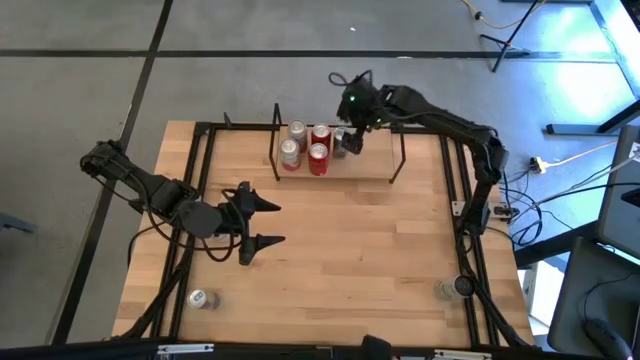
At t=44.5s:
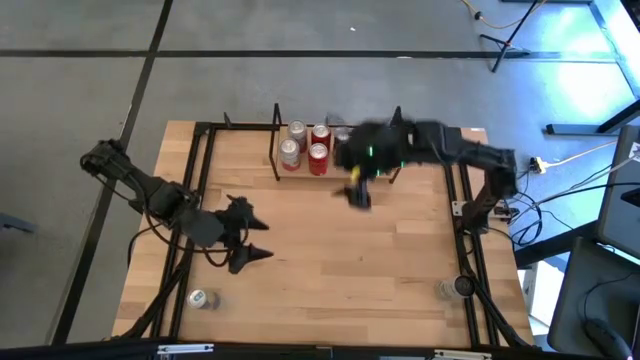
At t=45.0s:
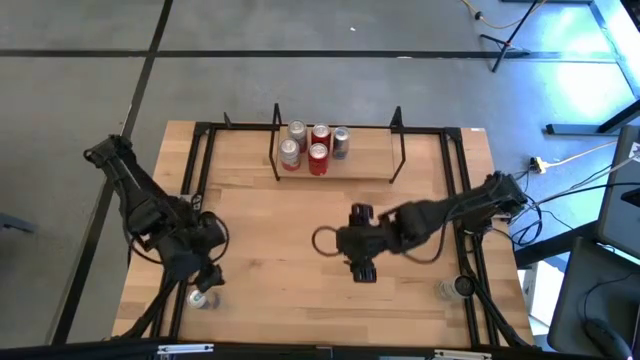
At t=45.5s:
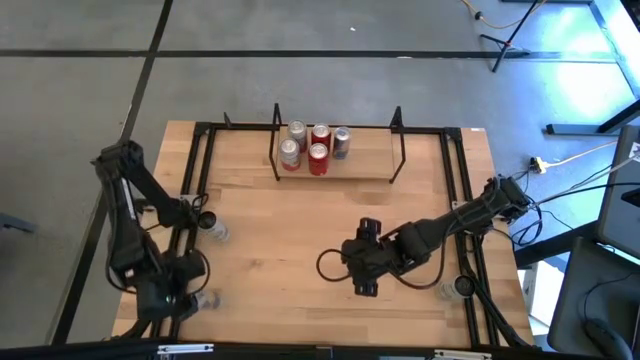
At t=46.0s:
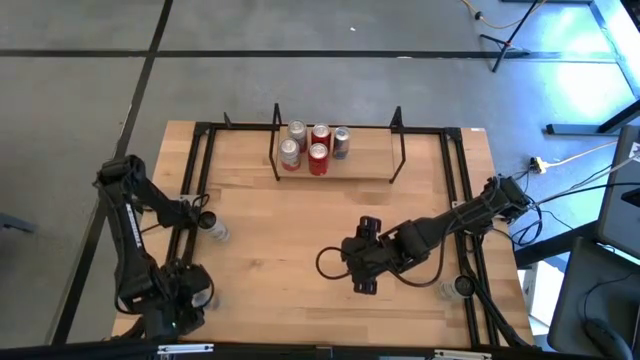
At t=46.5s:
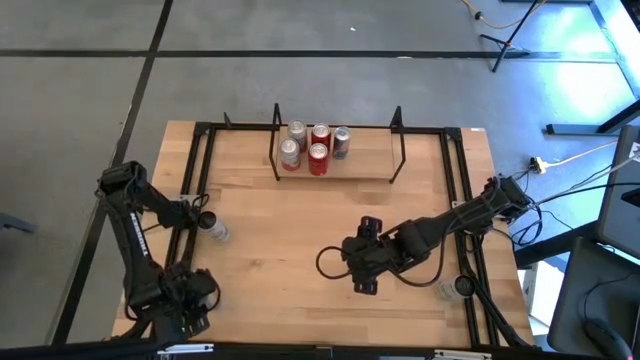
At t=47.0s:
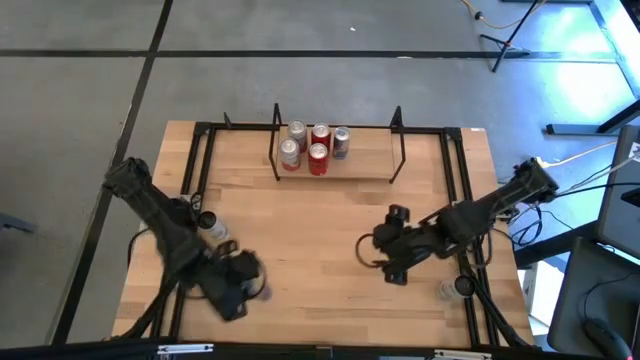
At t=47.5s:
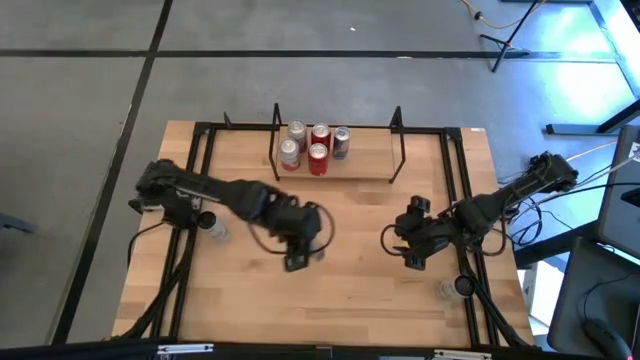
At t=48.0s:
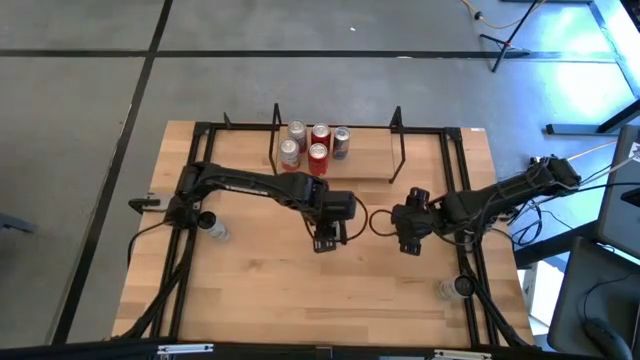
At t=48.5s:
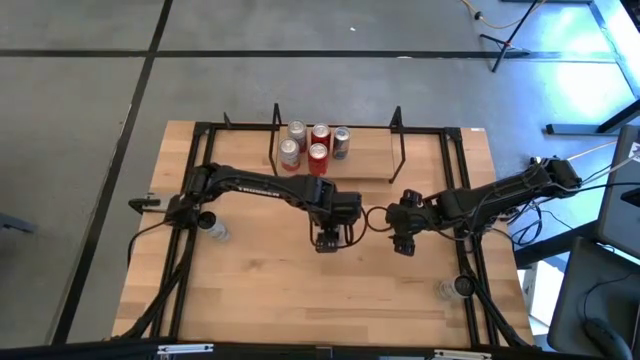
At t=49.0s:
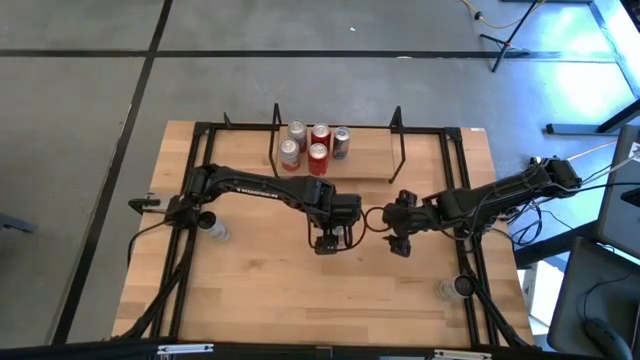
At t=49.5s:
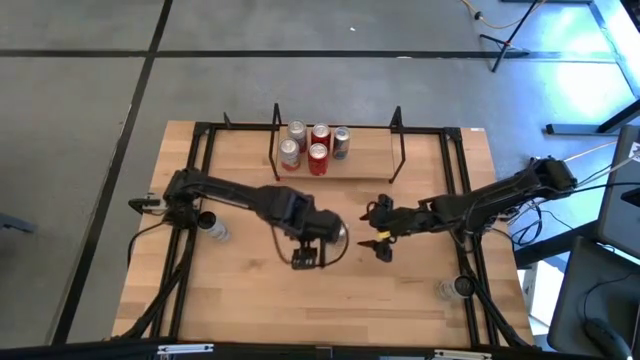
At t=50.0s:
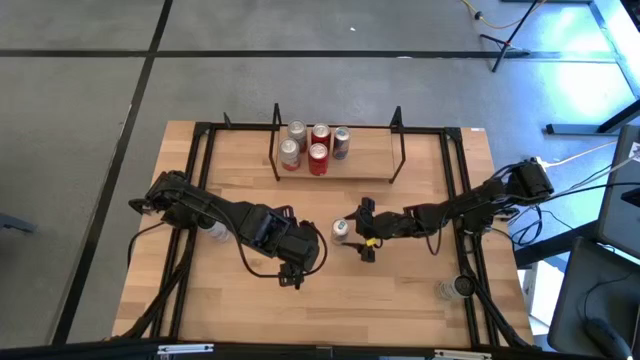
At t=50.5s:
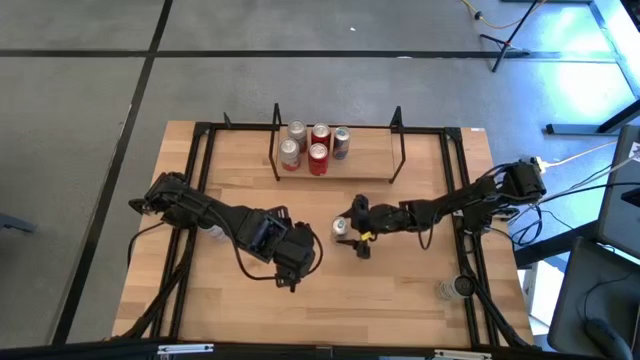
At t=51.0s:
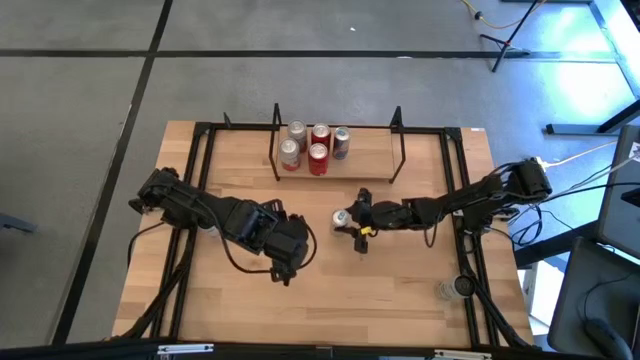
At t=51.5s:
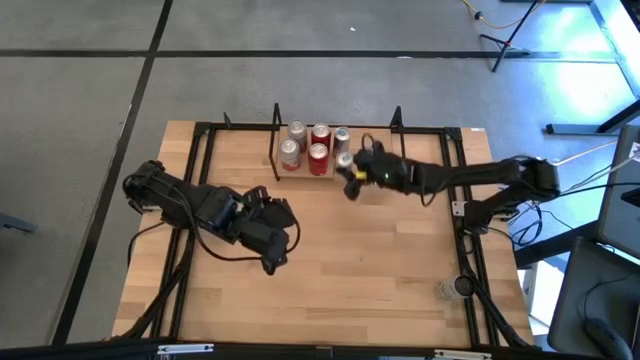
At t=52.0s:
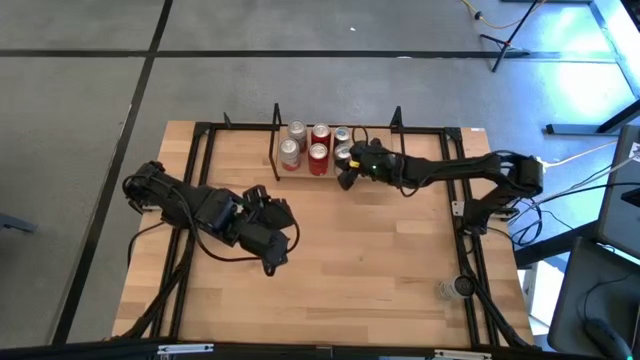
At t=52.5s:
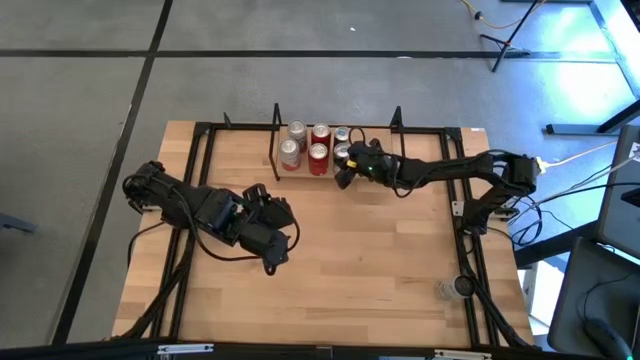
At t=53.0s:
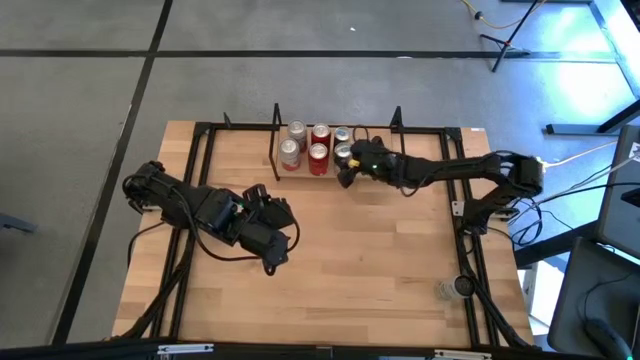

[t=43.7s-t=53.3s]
Task: Place canned beverage on shelf
Put the blue soda can on the shelf aligned with the other blue soda can

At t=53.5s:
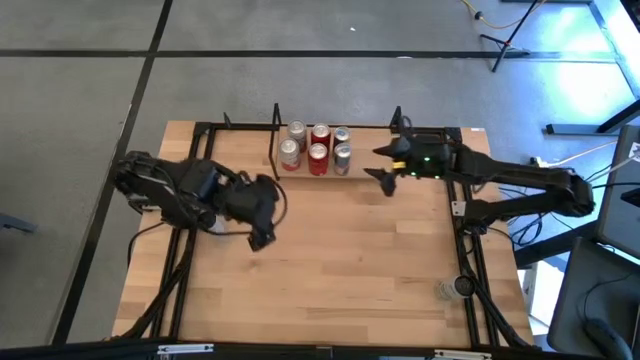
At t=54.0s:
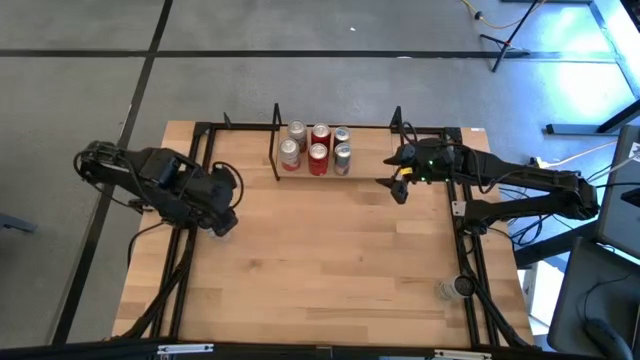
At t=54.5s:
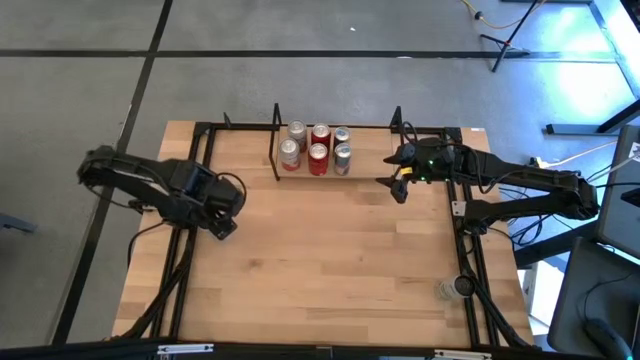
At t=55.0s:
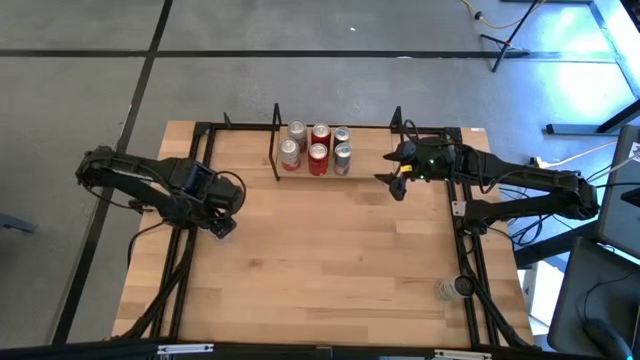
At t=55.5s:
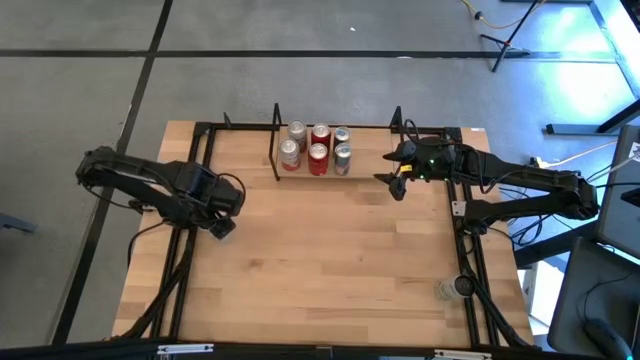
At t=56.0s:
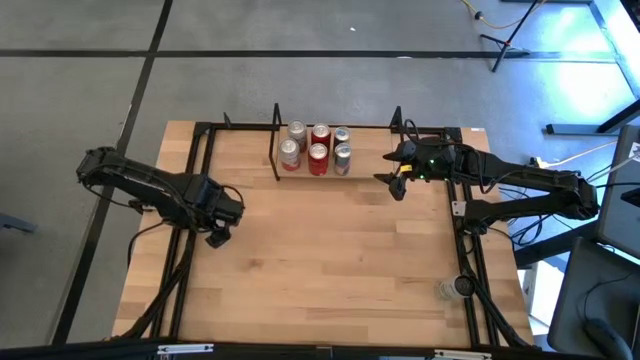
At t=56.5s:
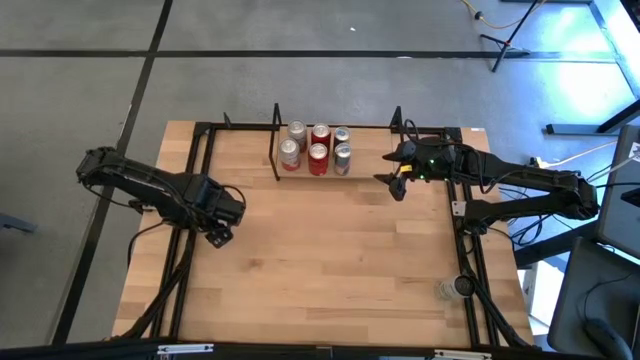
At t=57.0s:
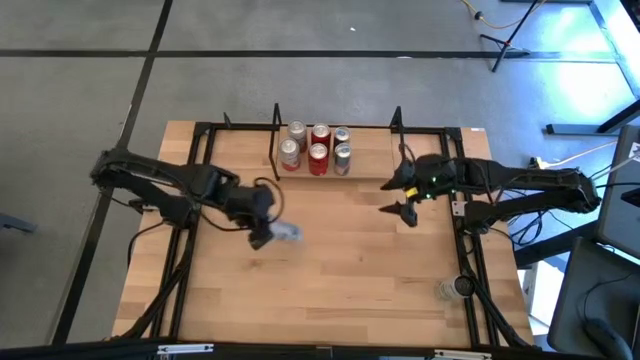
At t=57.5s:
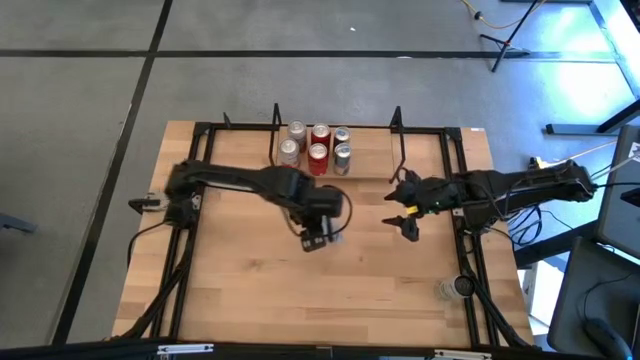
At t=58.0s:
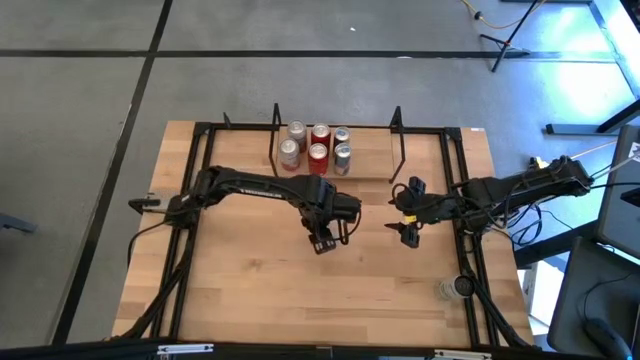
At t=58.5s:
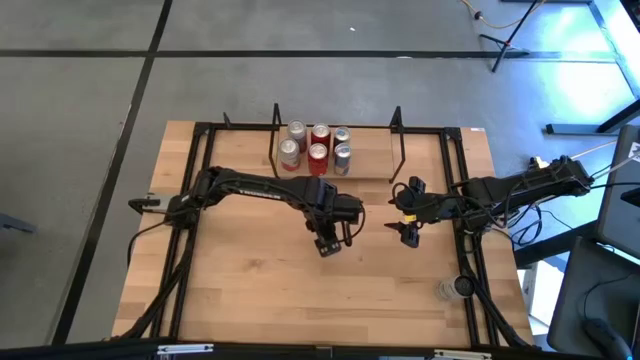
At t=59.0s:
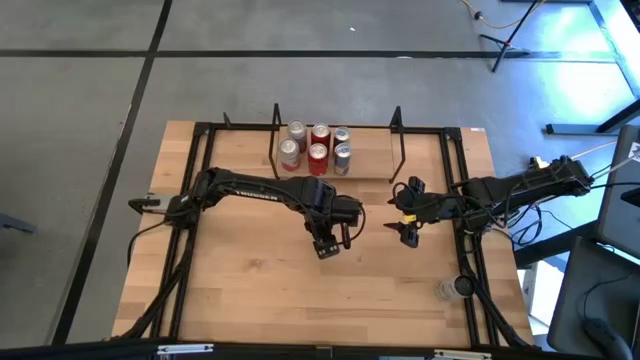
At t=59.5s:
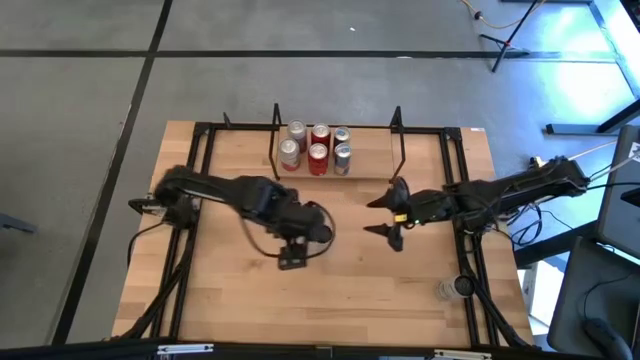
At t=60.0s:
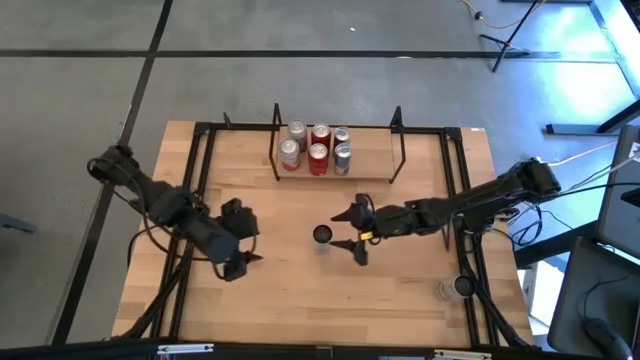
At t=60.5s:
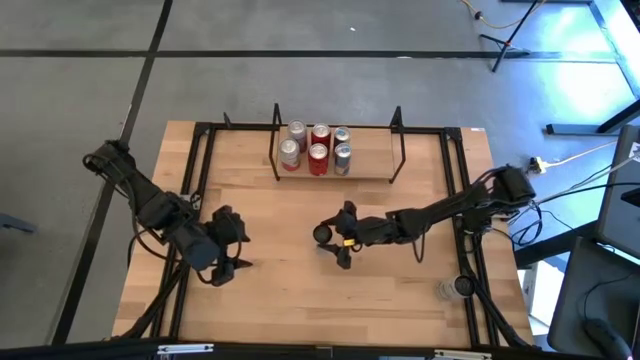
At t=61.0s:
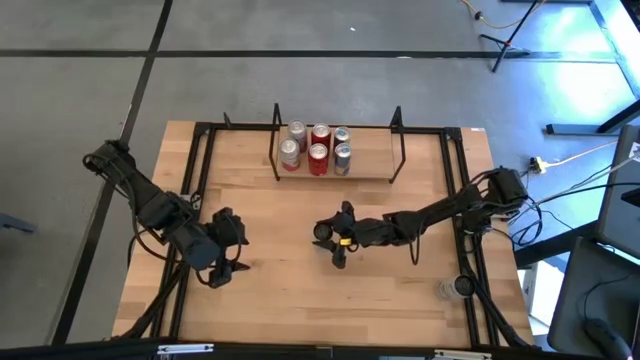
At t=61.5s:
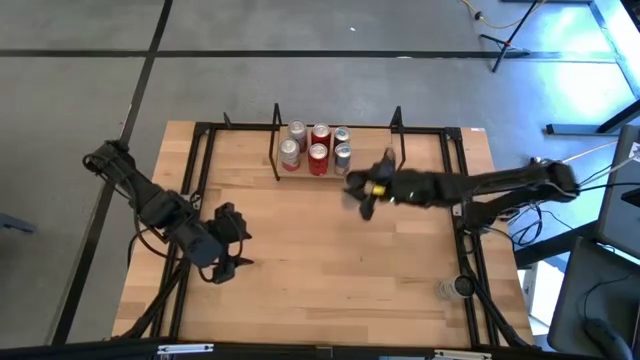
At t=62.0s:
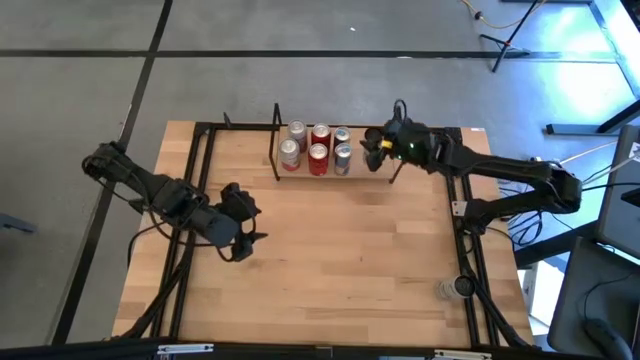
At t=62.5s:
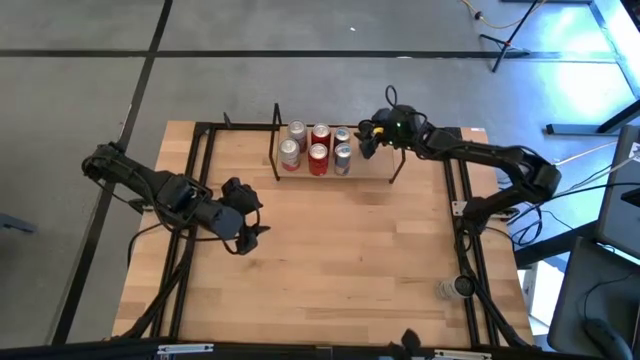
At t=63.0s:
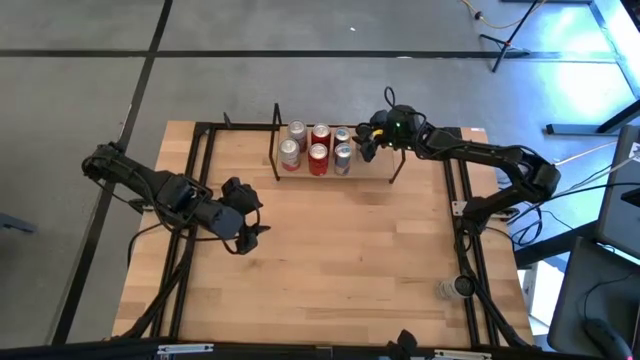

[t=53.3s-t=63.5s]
Put the left white soda can on the shelf

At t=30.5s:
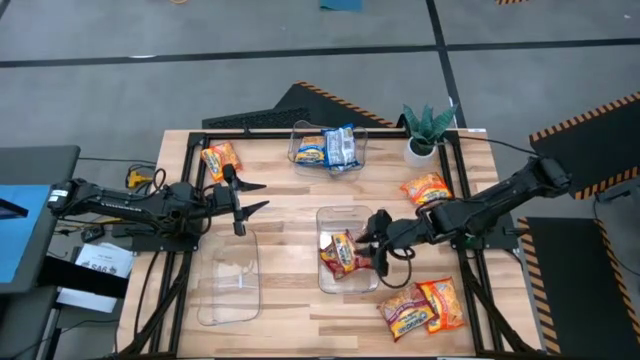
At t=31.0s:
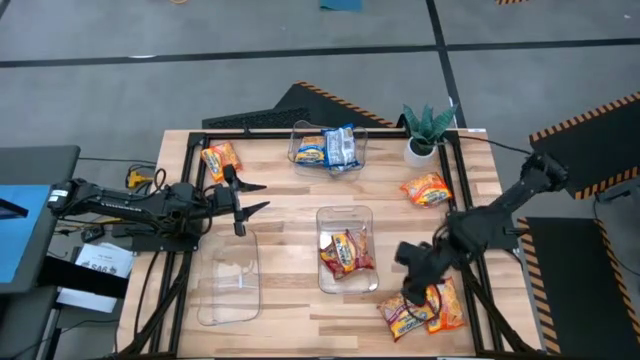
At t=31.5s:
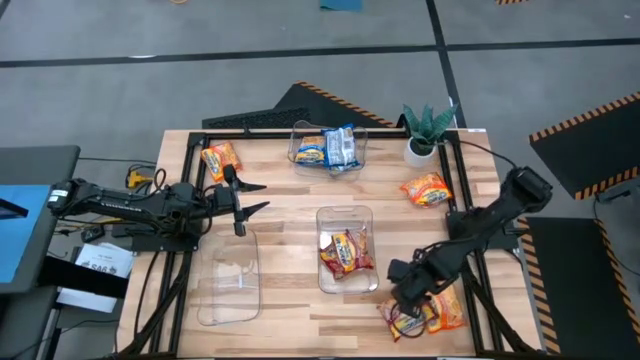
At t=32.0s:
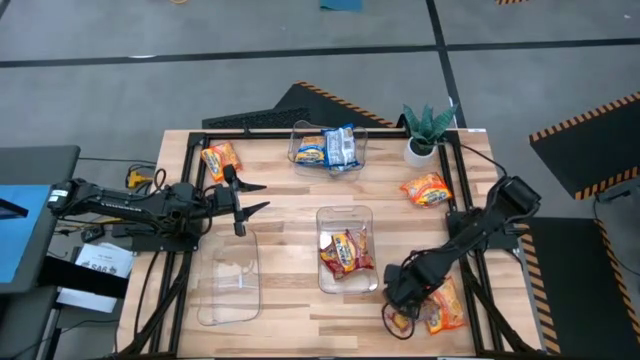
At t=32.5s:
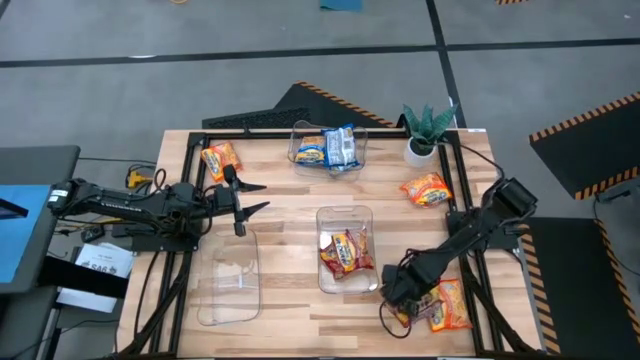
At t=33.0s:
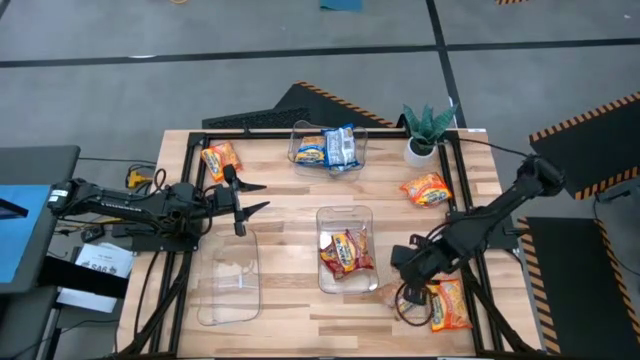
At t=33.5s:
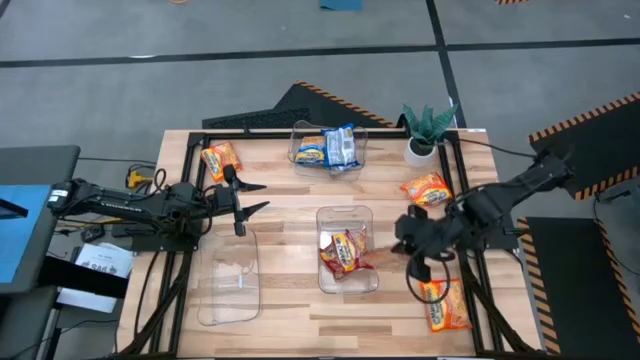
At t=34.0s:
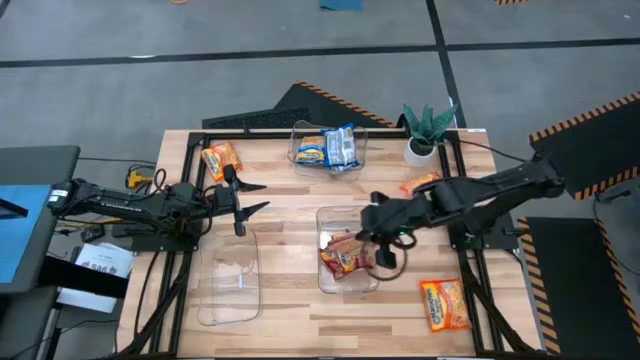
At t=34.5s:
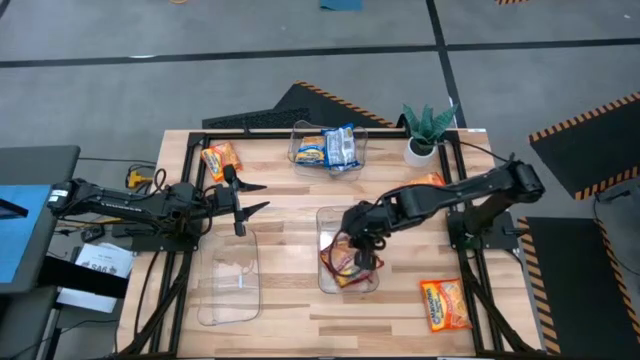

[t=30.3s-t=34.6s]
Task: Sort Maruchan noodles
Put the red noodle pack into the right transparent bin
